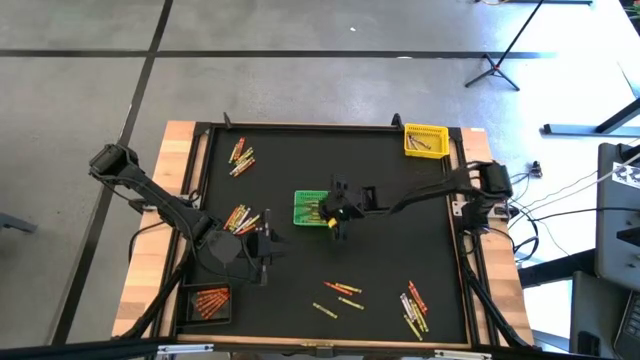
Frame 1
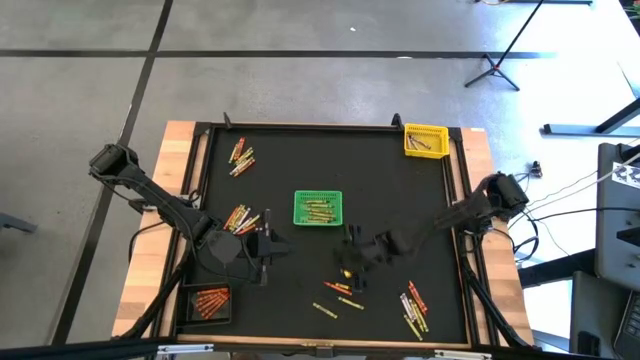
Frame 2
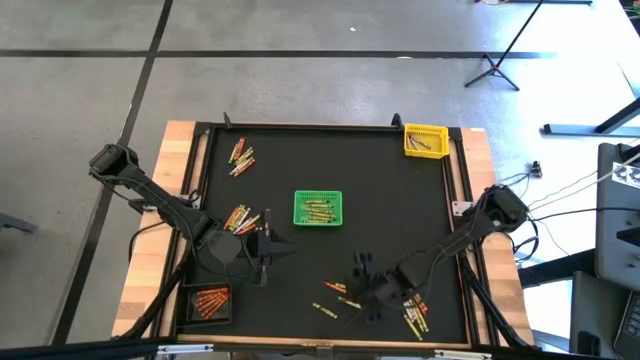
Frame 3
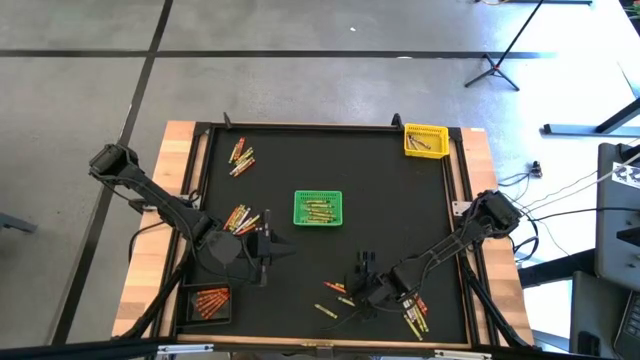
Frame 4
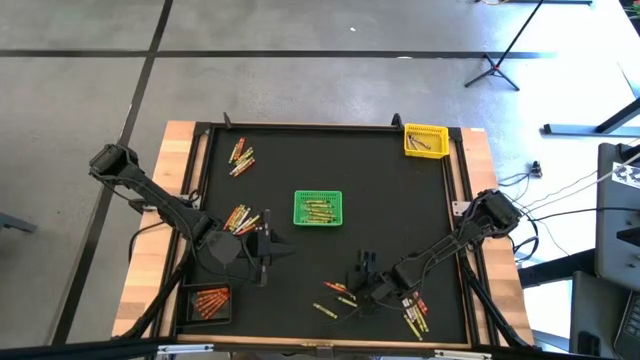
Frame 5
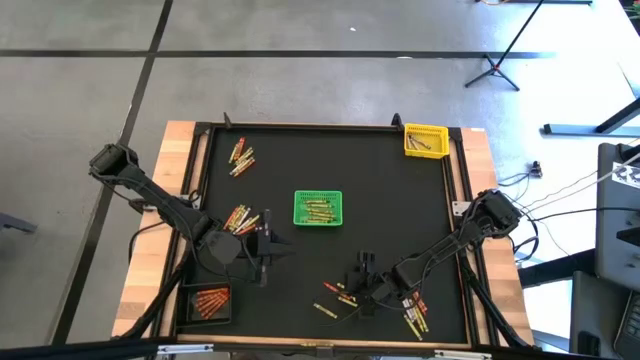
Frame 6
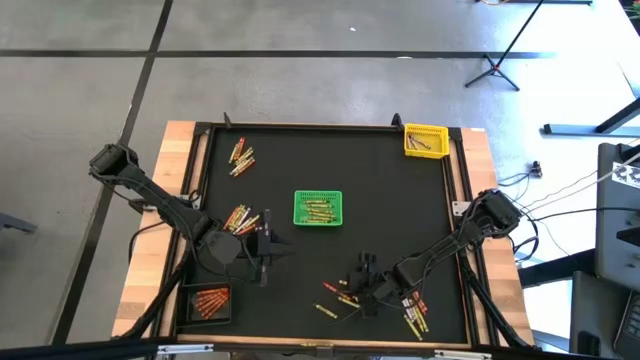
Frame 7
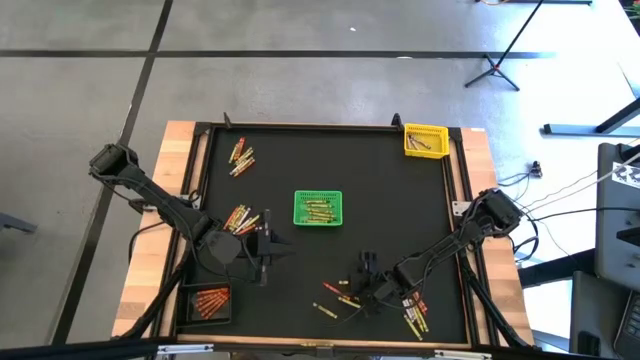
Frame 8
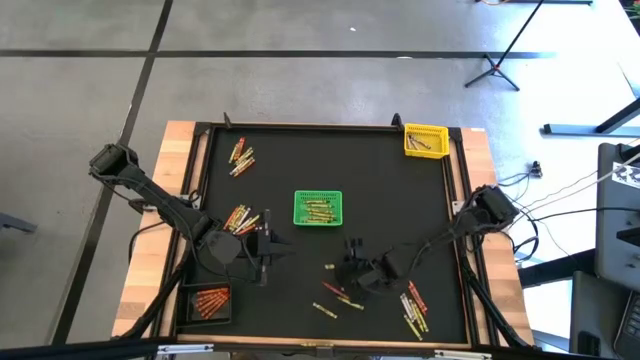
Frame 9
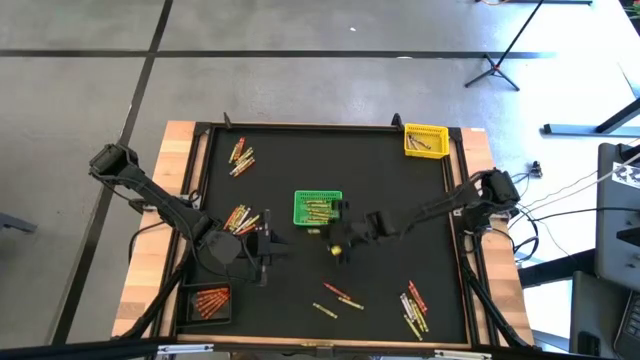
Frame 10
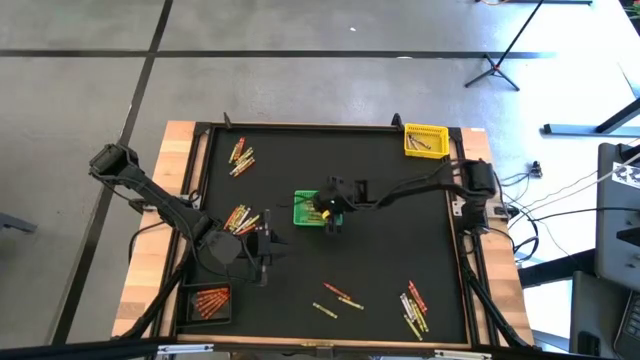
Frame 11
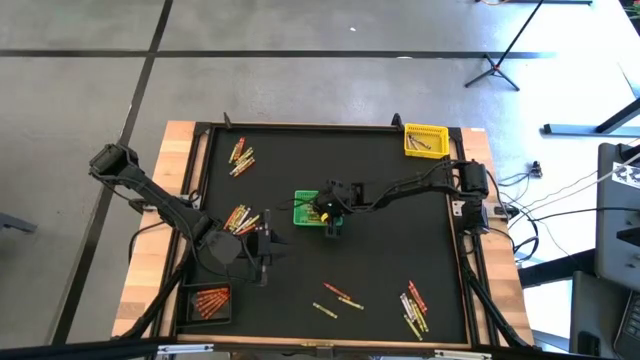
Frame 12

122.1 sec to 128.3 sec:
Task: Sort crayons
Put the green crayon into the green bin

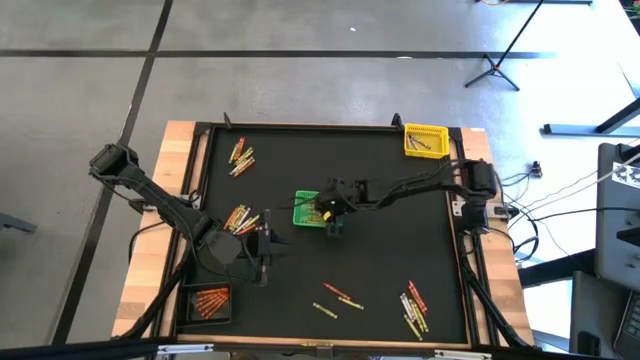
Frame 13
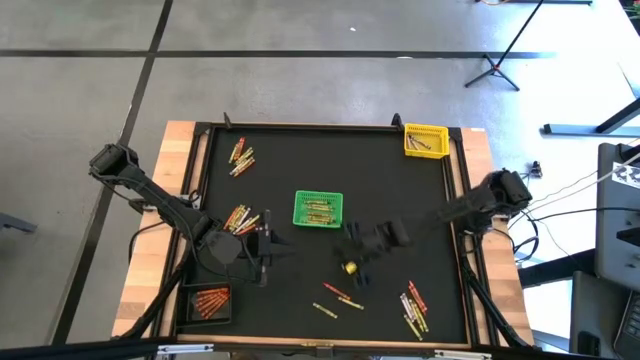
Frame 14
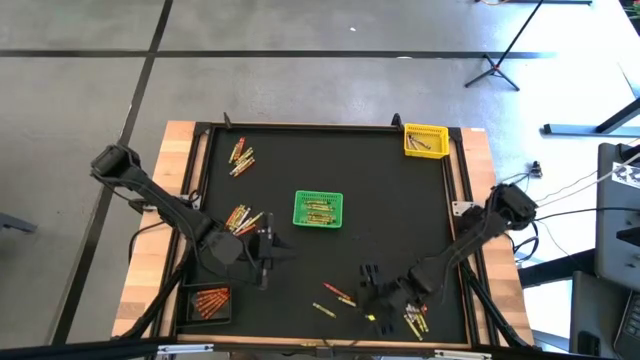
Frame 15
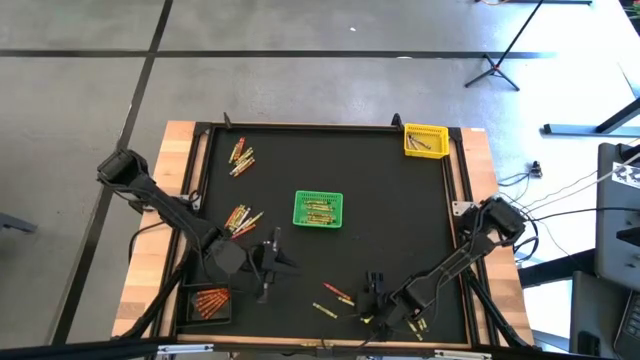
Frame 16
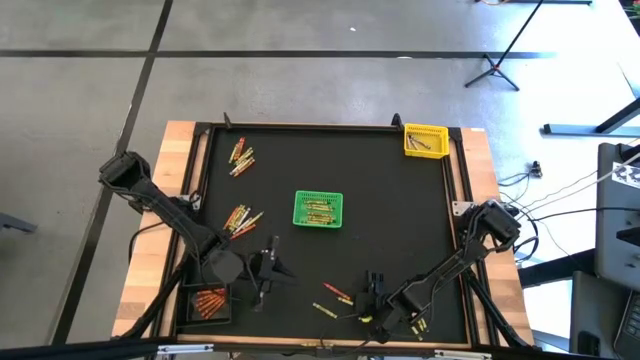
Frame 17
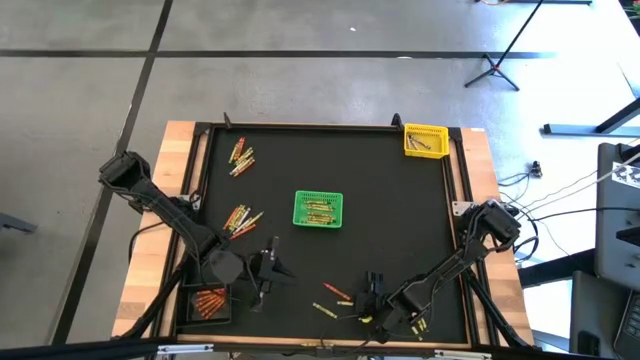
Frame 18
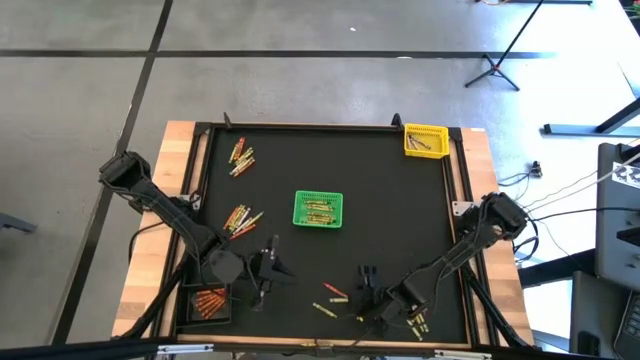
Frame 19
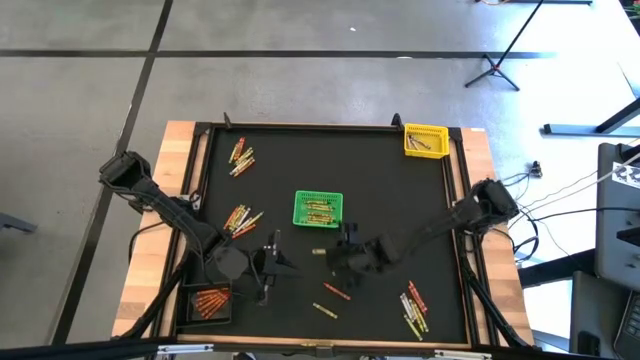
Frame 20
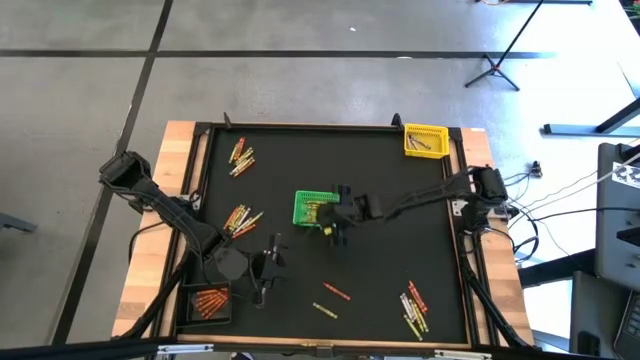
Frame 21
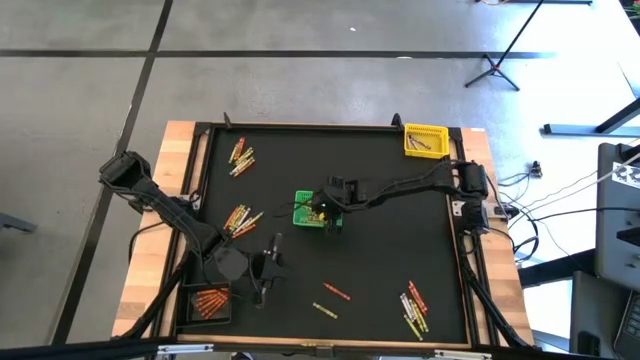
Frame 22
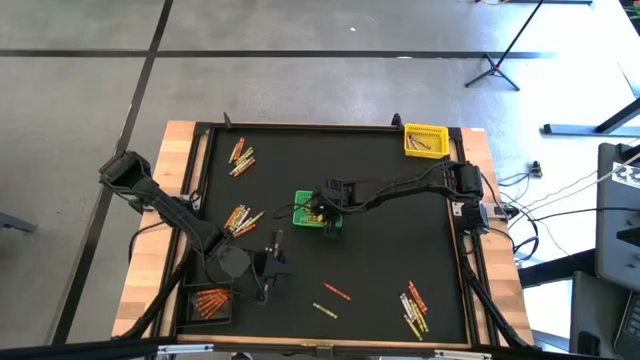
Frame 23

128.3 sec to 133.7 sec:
Put the green crayon into the green bin

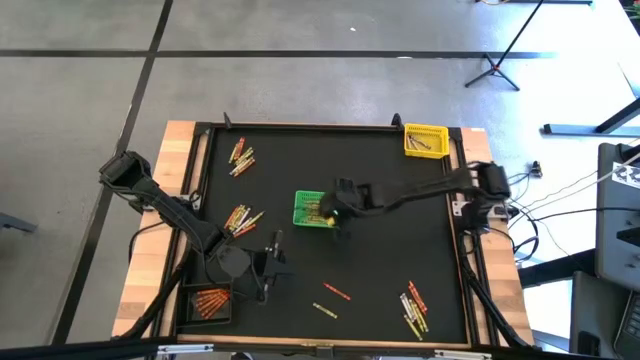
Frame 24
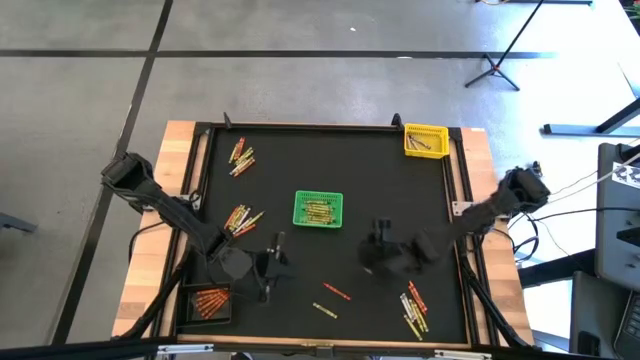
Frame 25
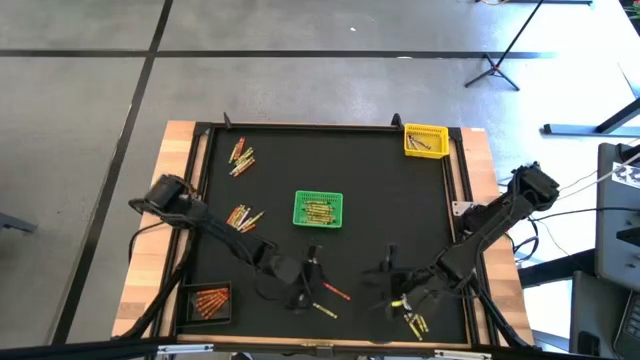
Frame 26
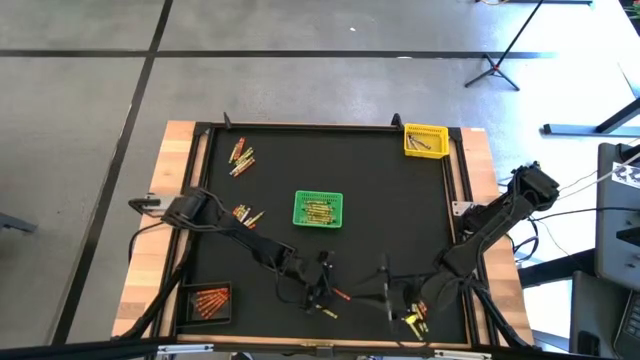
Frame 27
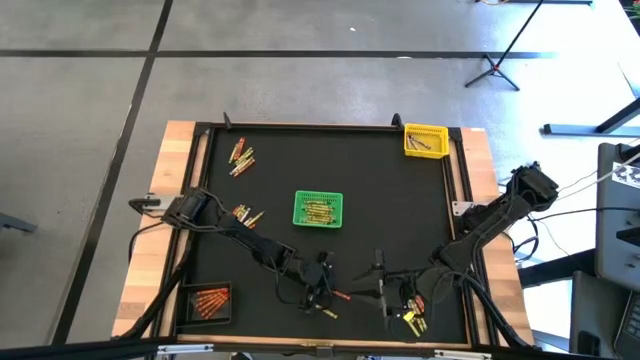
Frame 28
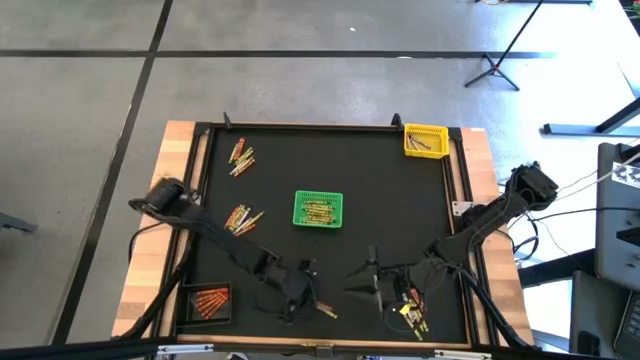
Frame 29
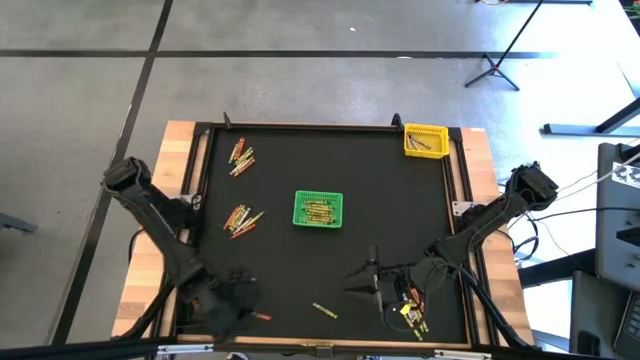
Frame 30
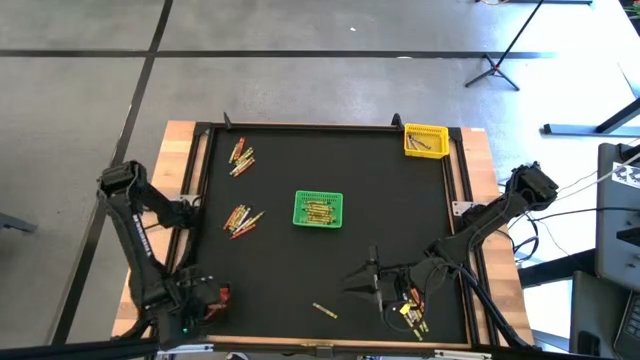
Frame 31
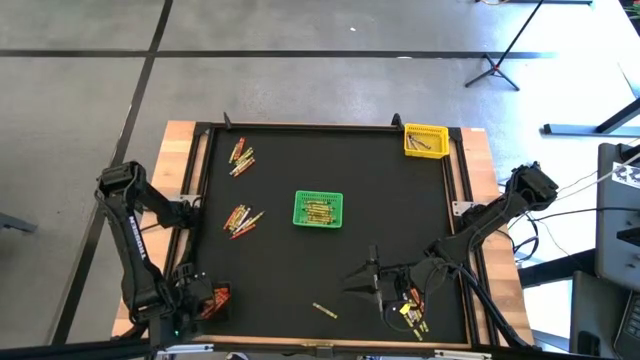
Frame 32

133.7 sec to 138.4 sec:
Put the orange crayon into the black bin

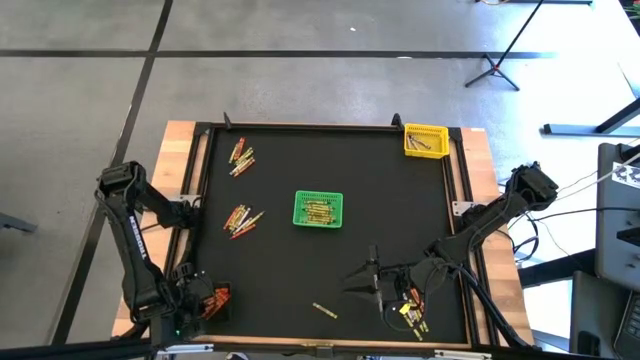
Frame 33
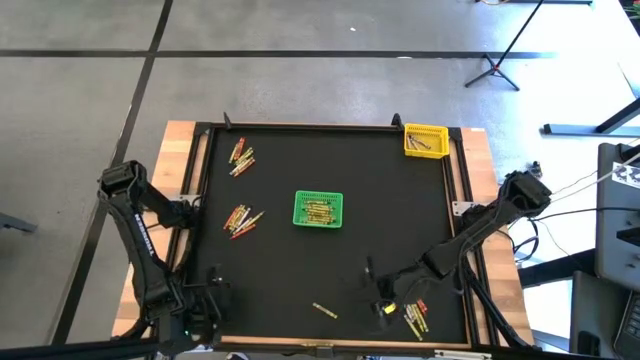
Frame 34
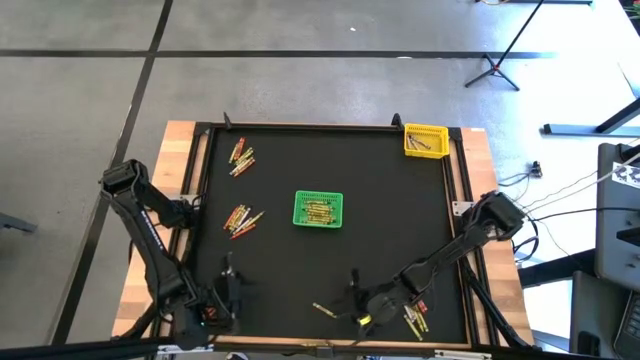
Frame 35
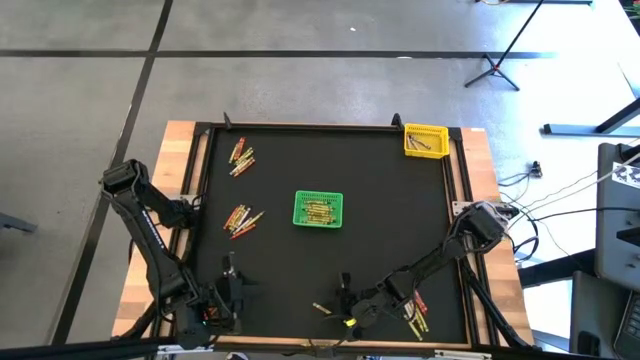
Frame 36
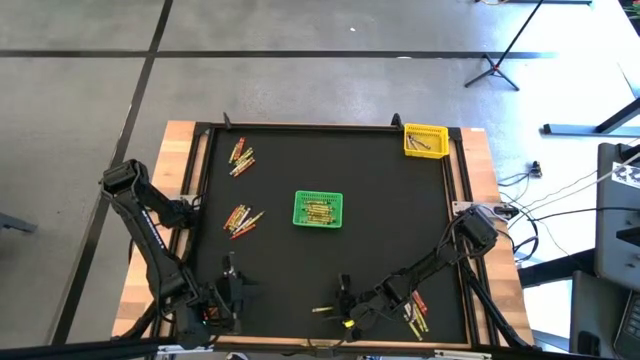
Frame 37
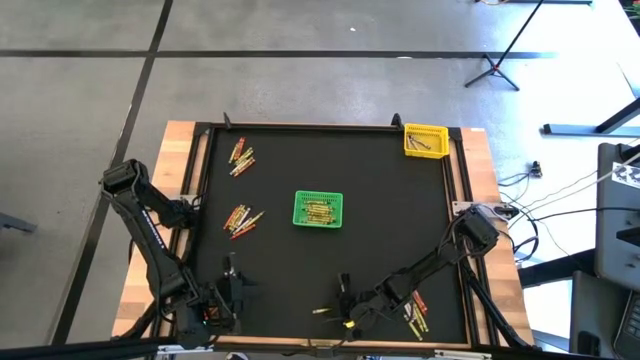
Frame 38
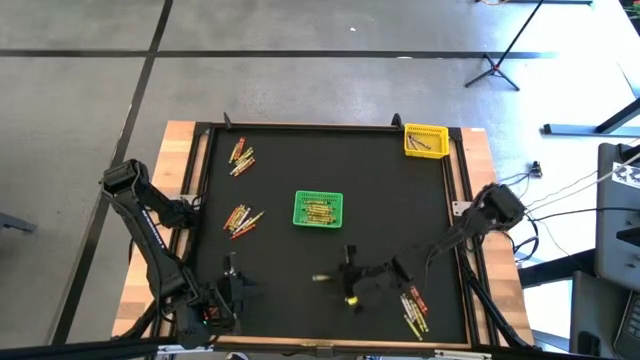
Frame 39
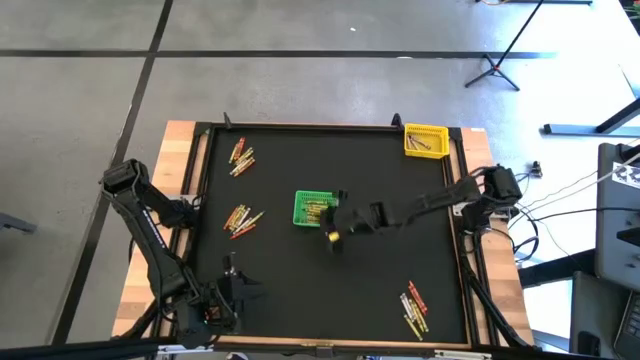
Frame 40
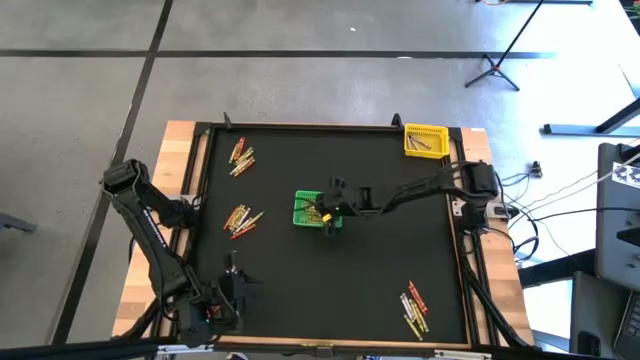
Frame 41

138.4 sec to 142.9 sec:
Put the green crayon into the green bin

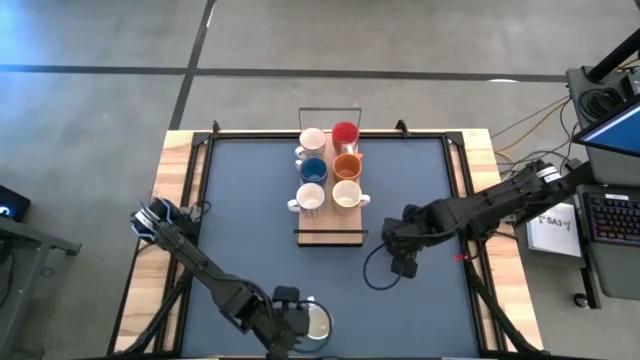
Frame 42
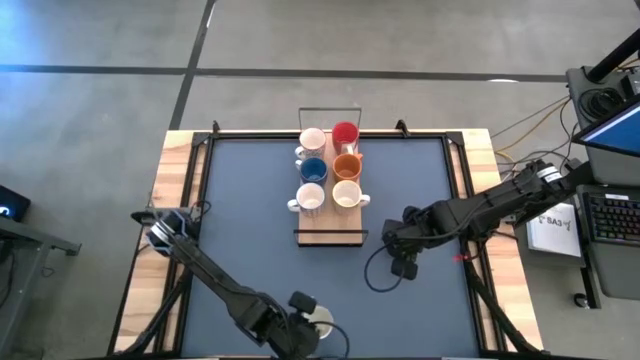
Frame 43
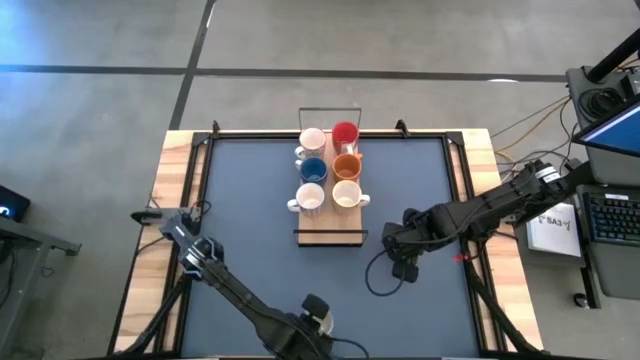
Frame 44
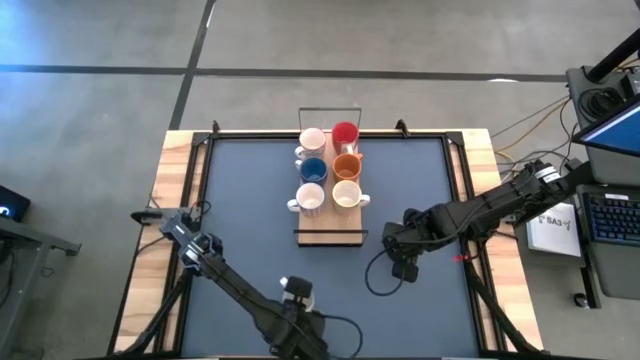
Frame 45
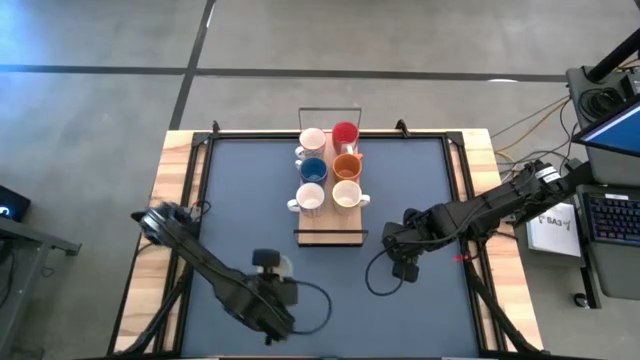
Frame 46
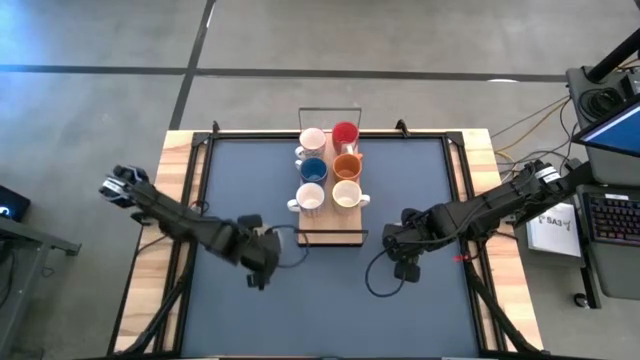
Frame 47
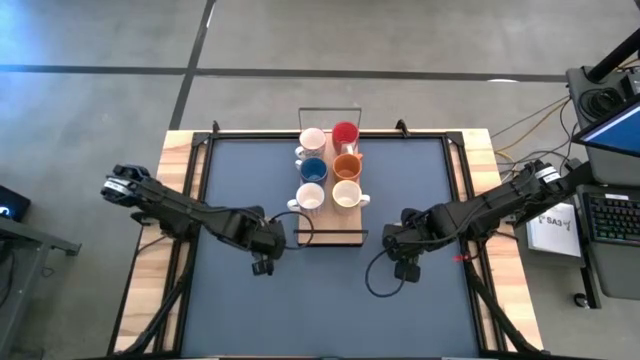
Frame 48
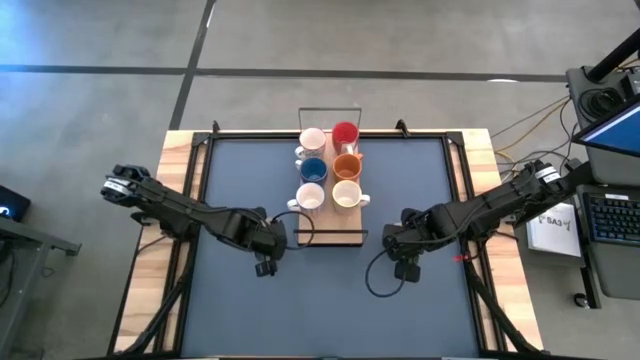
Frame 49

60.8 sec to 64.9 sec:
Task: Place coffee mugs
Move the green mug to the middle left of the table
